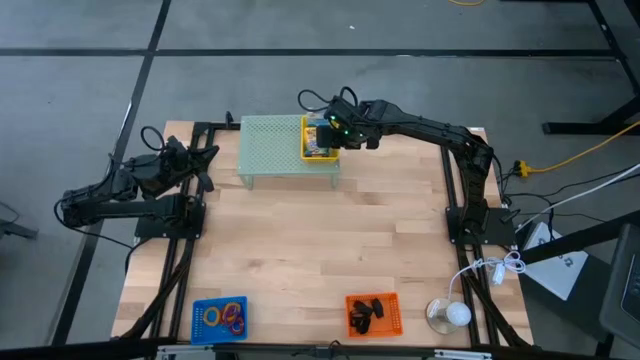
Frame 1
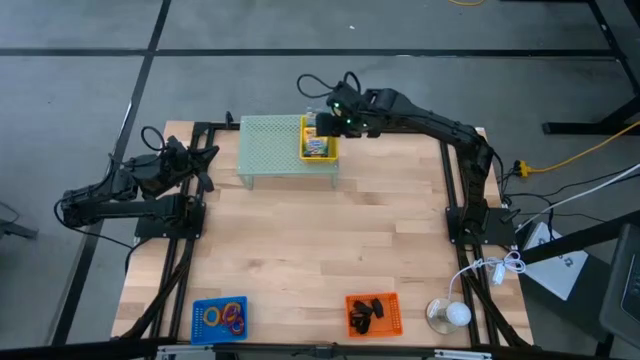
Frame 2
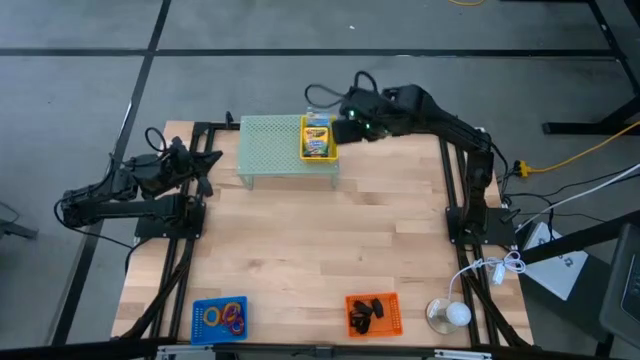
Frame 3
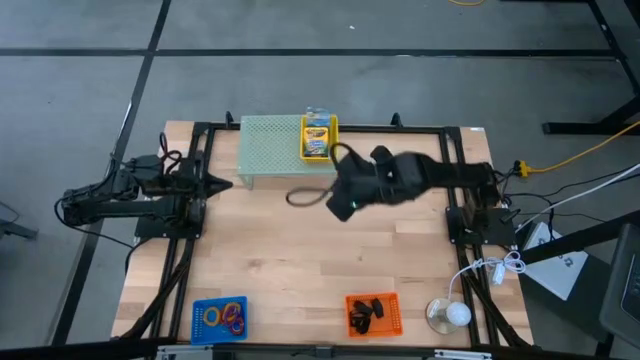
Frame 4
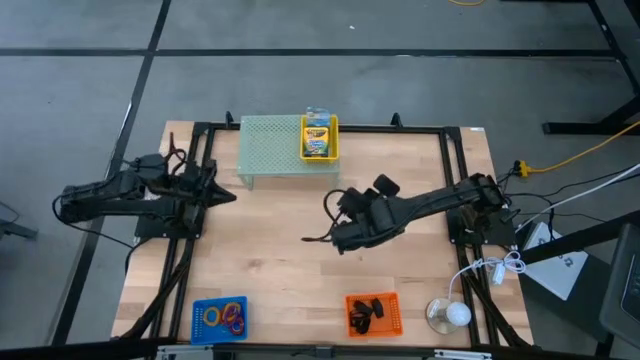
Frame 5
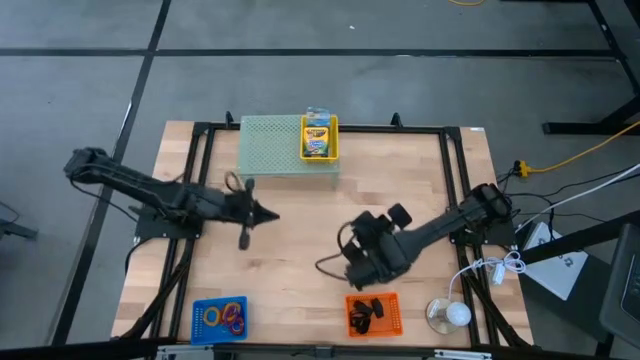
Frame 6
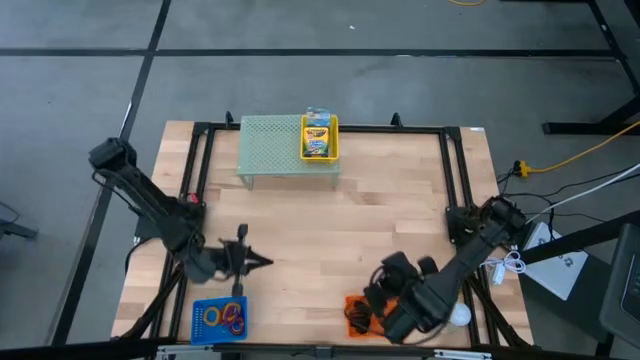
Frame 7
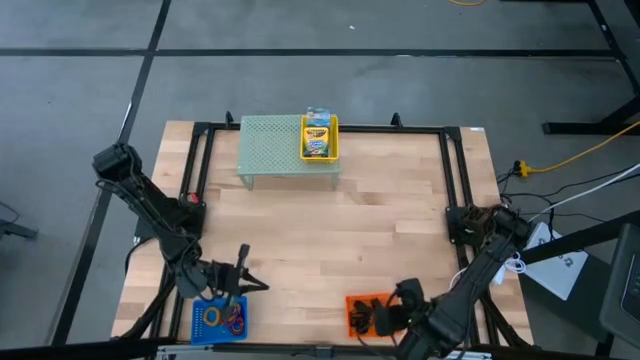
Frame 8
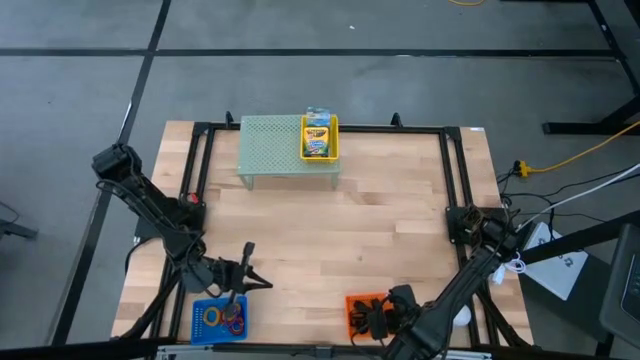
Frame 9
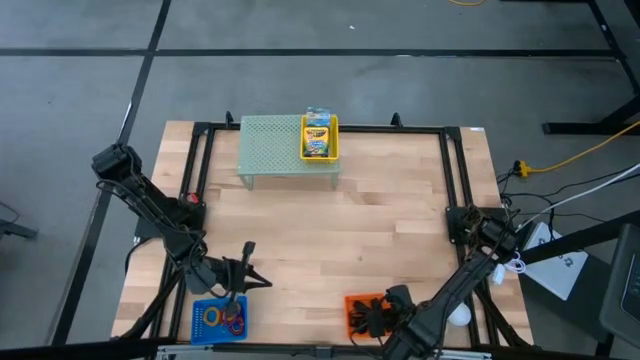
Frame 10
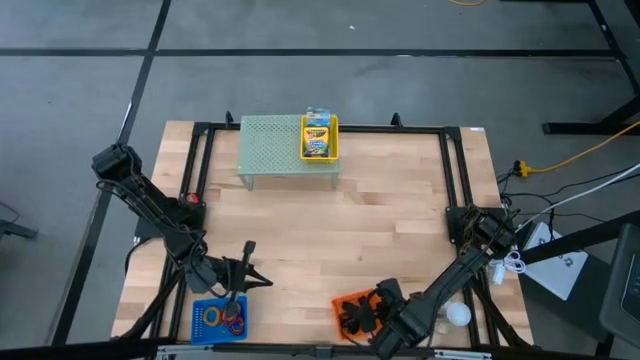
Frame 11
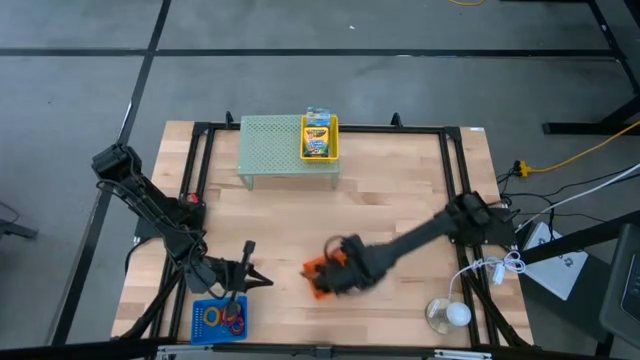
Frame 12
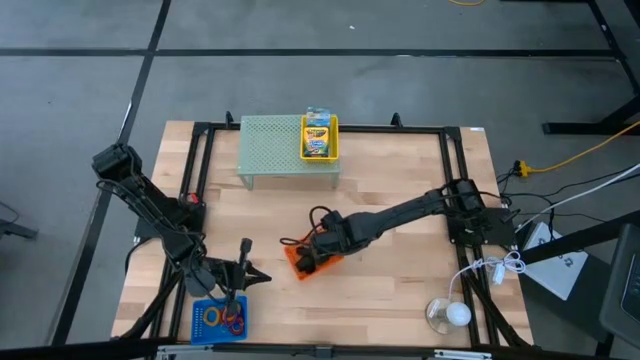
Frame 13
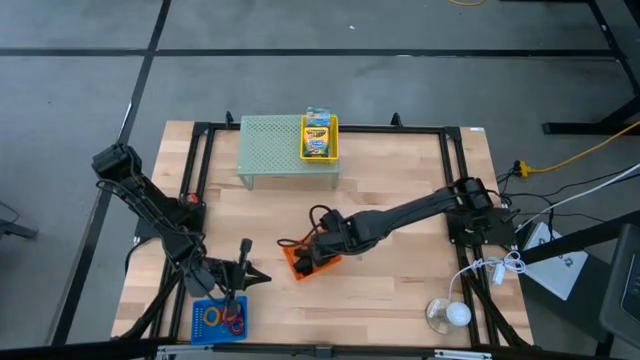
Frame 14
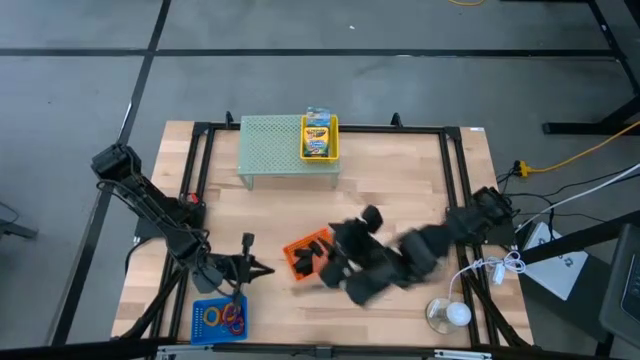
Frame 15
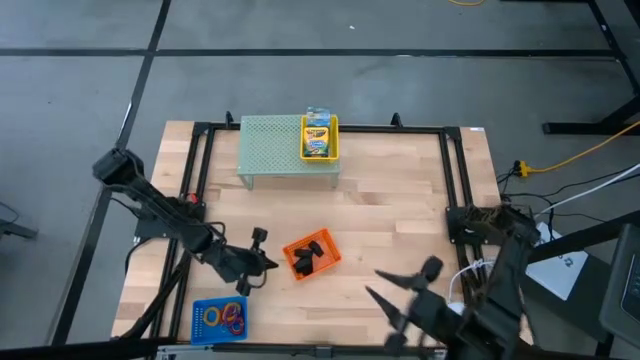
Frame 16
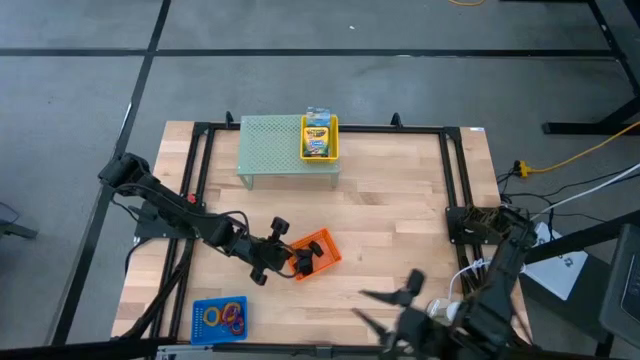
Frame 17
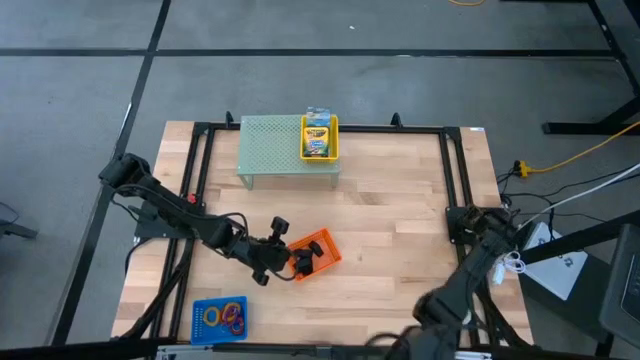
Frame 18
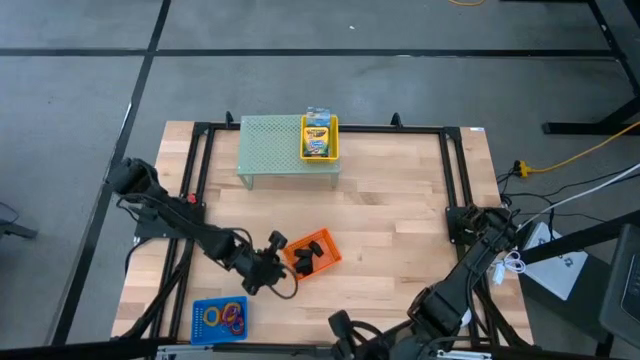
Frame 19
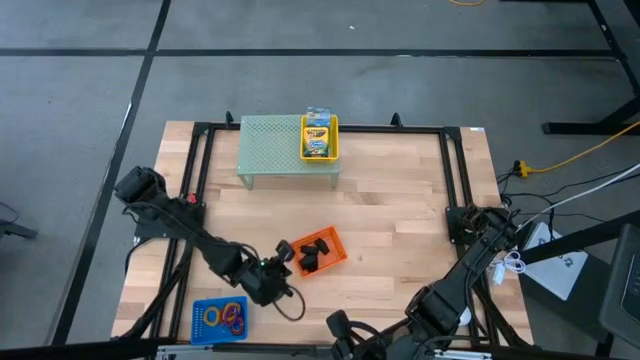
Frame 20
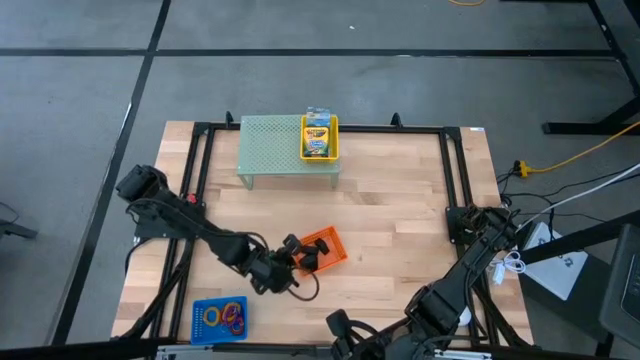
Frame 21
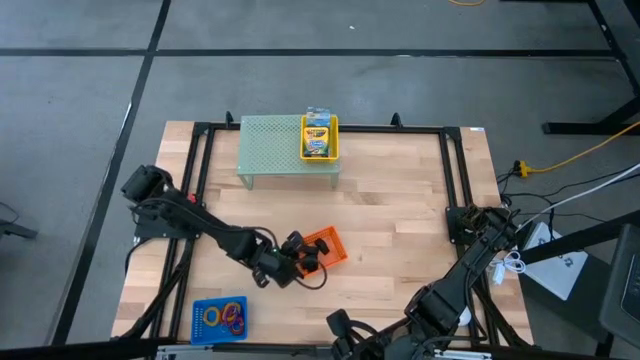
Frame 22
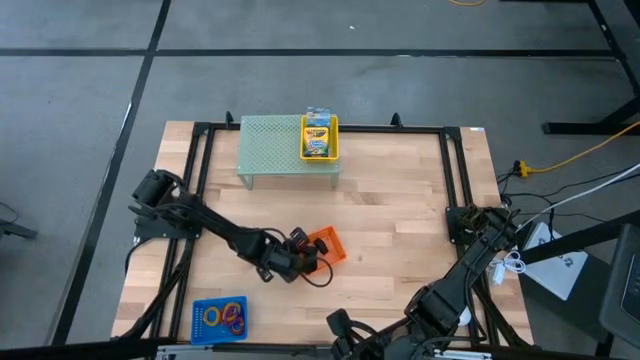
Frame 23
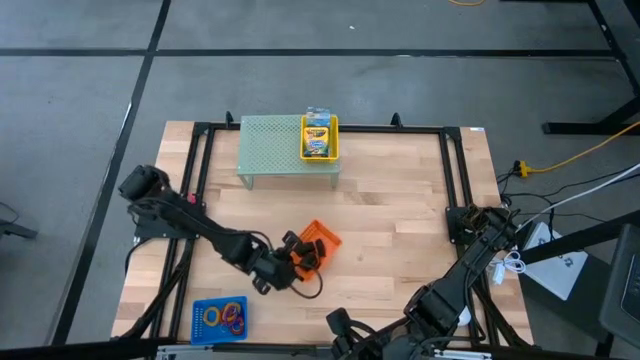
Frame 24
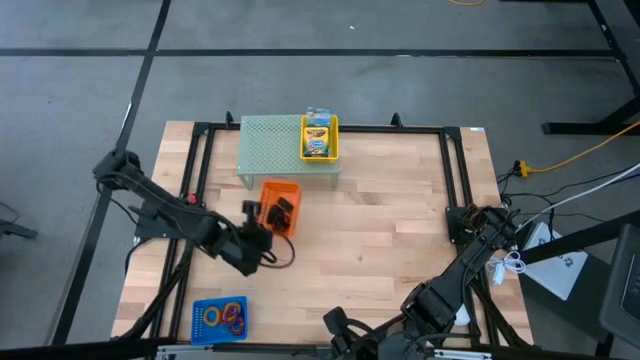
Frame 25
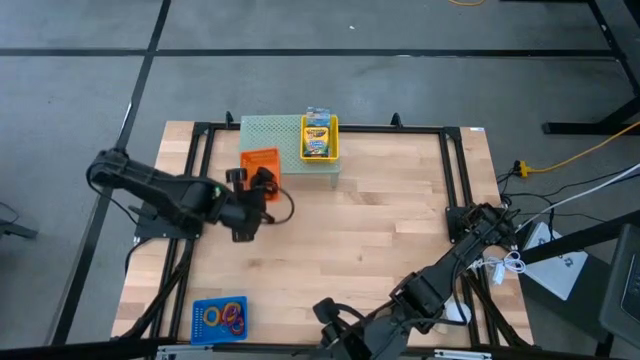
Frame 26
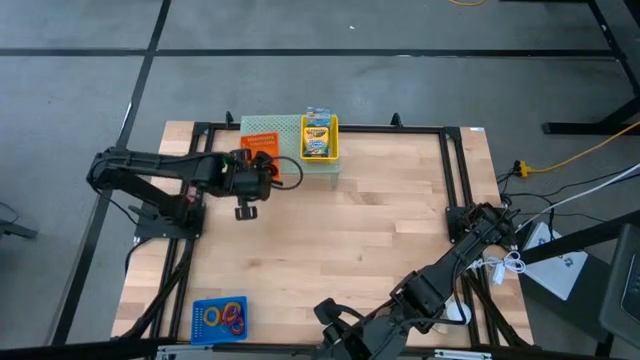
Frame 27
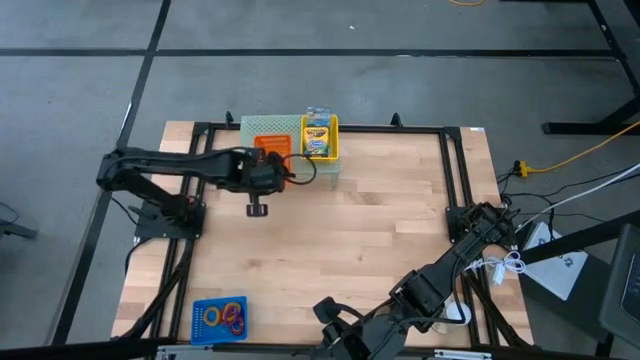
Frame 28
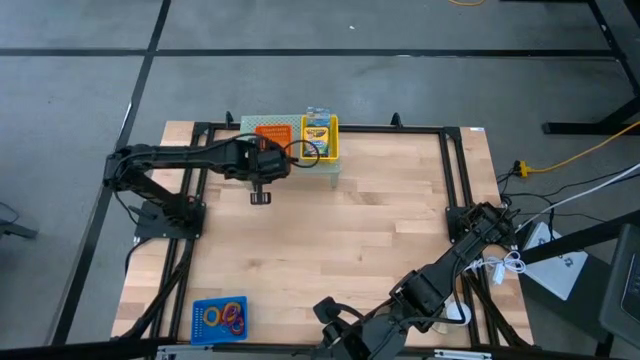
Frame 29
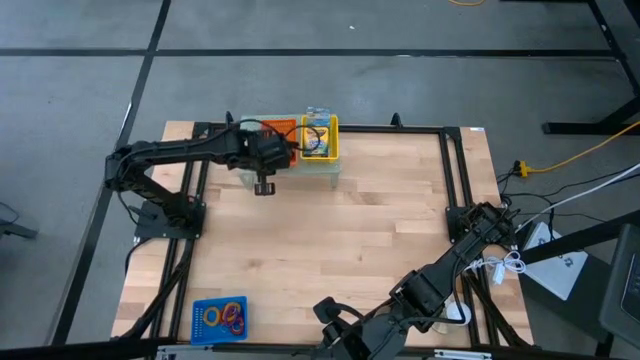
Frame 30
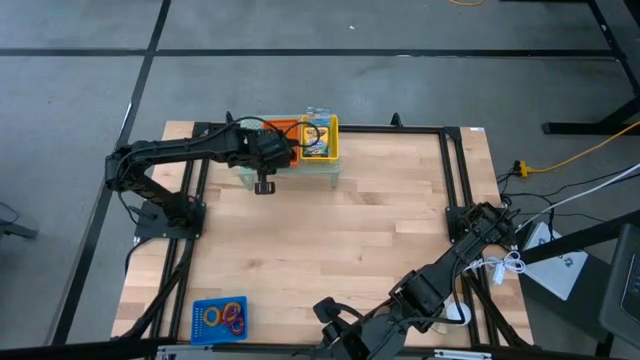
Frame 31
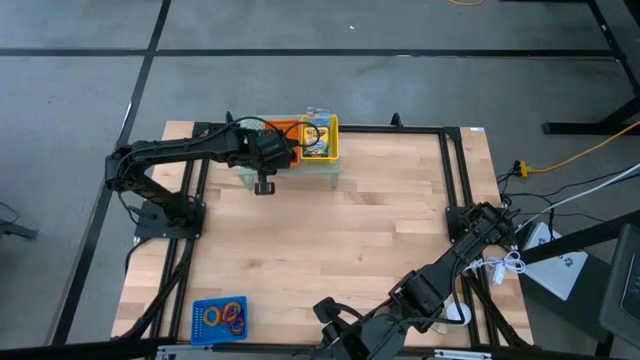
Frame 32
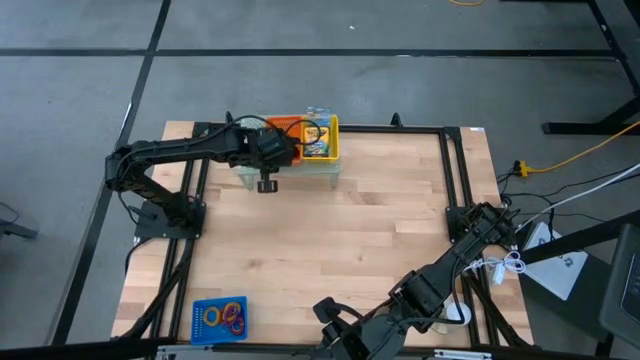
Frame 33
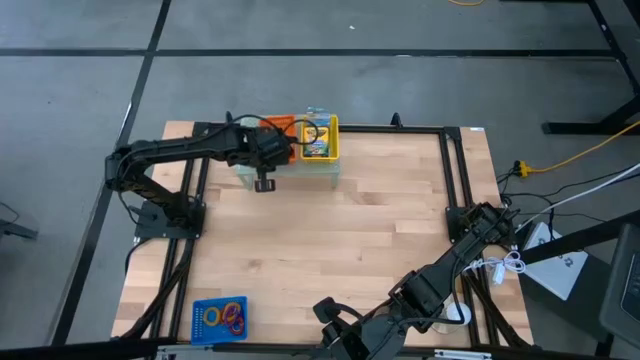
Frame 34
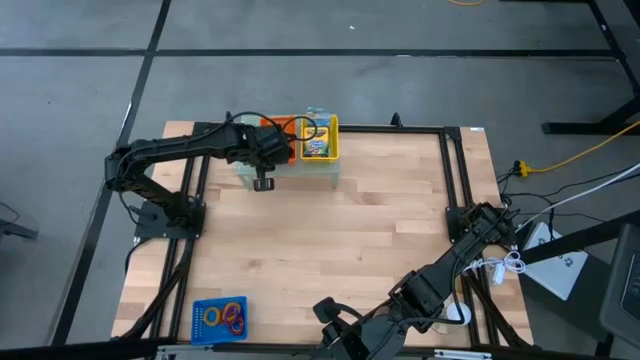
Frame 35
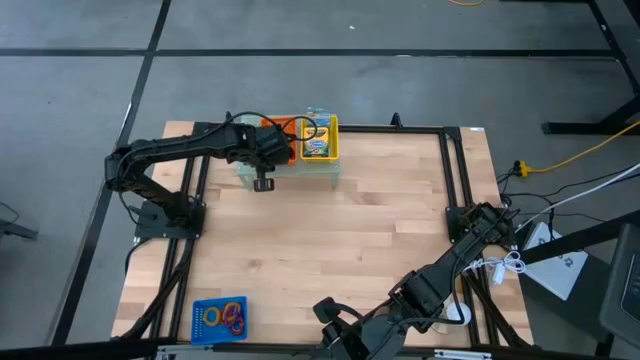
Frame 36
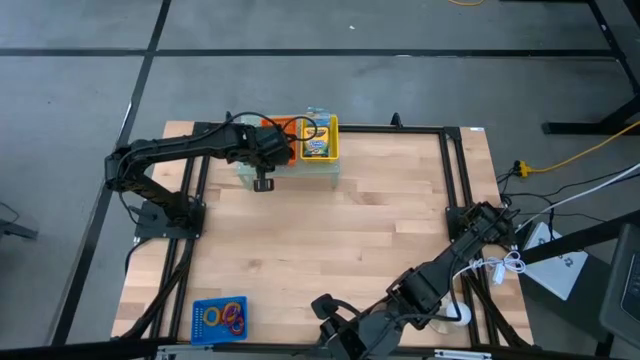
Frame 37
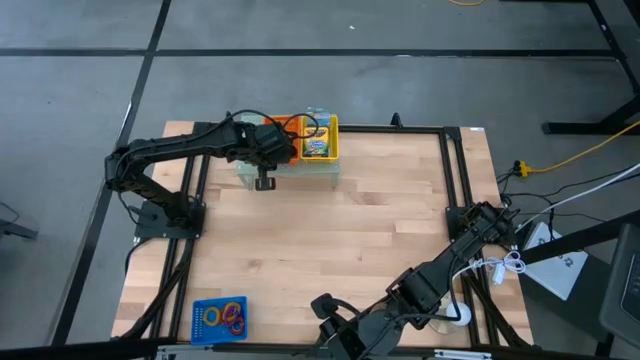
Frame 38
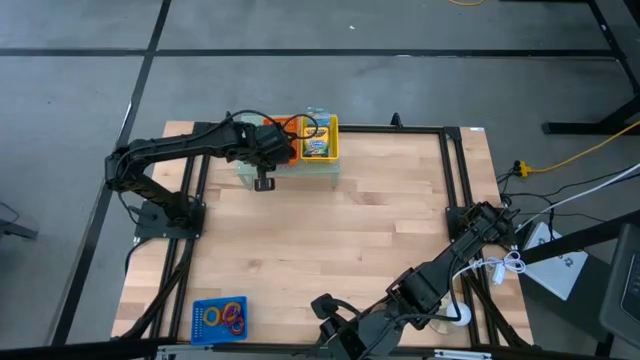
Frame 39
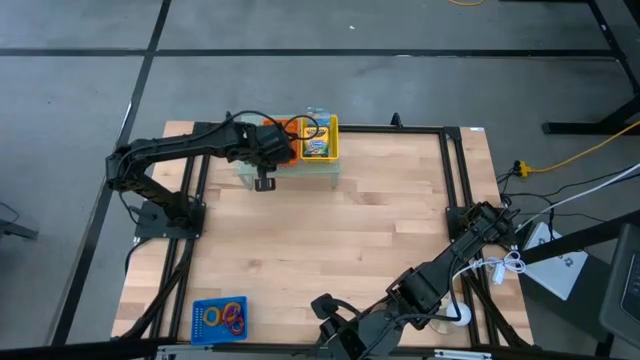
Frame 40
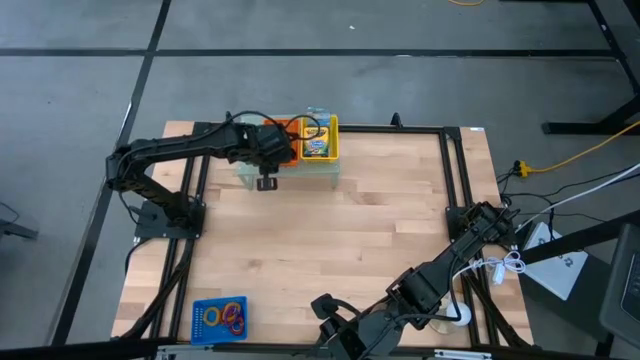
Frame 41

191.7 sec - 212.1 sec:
Task: Pick & Place Office Desk Supplies
Put the orange bin on the shelf
